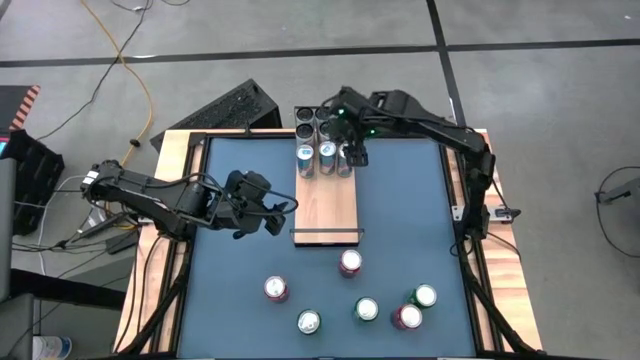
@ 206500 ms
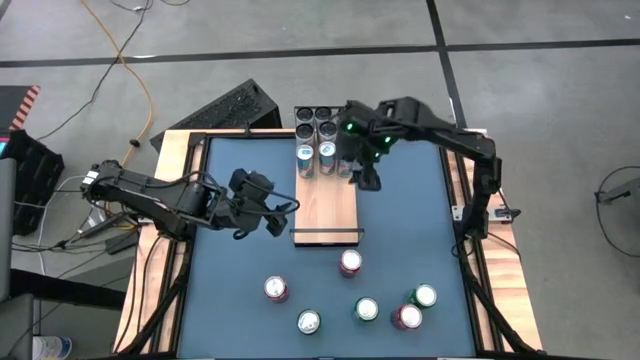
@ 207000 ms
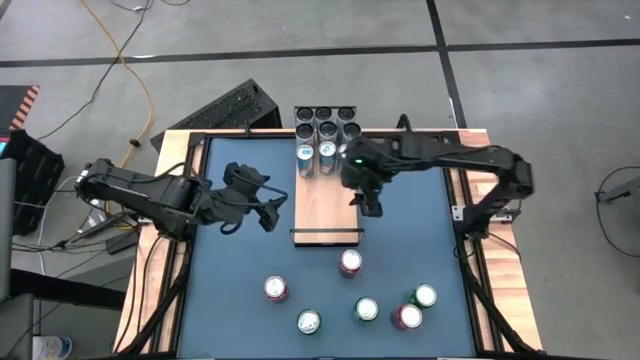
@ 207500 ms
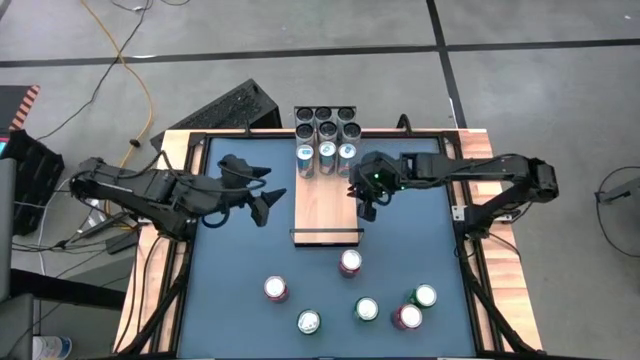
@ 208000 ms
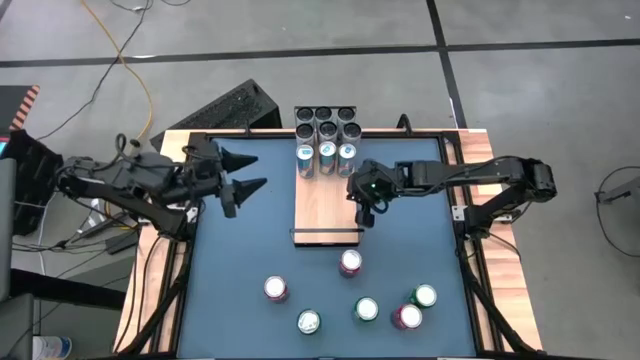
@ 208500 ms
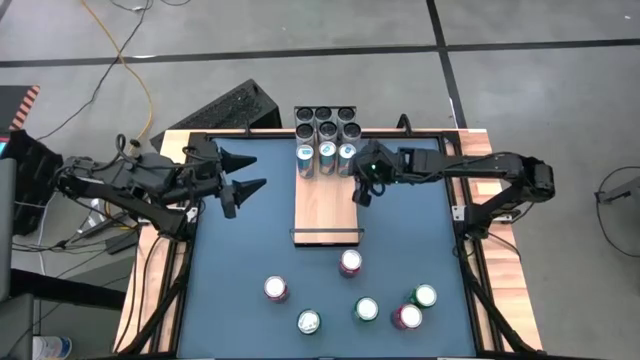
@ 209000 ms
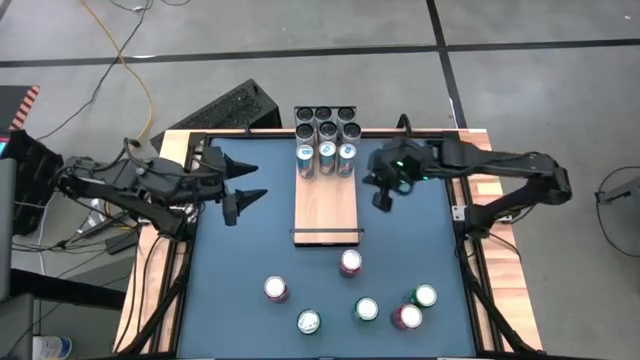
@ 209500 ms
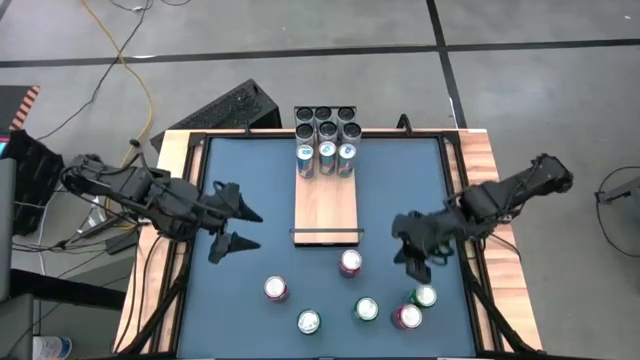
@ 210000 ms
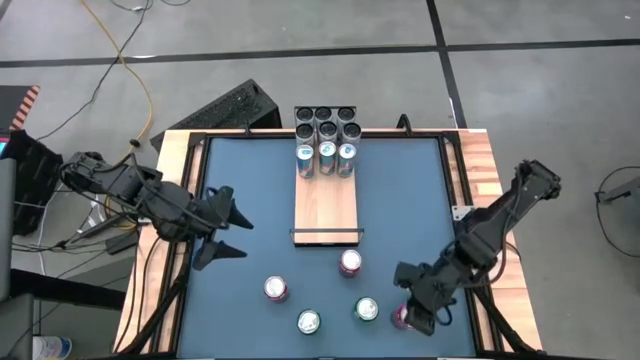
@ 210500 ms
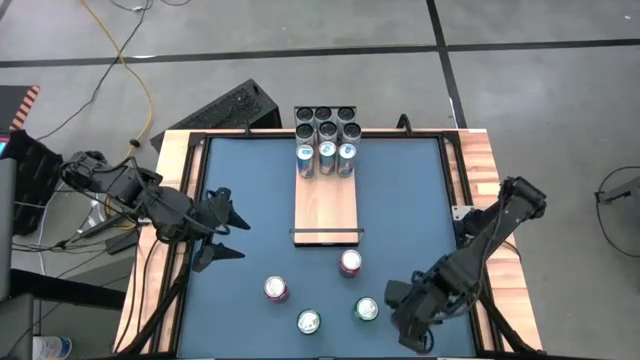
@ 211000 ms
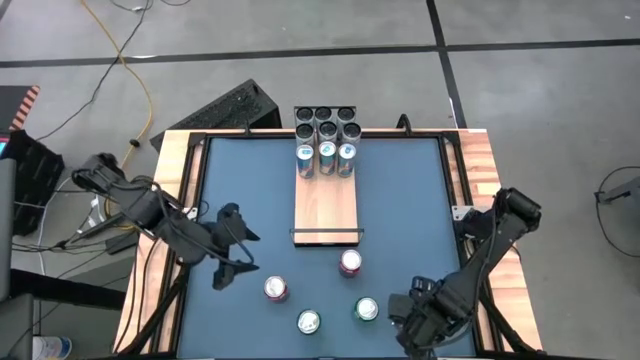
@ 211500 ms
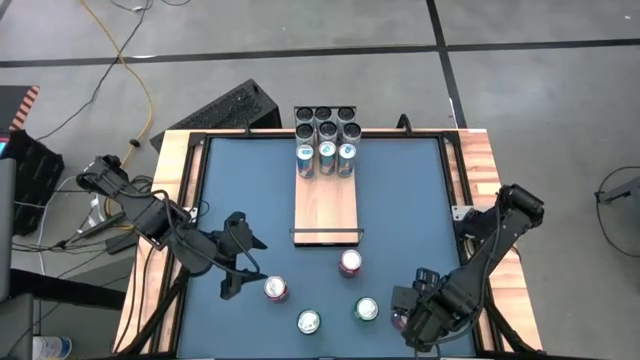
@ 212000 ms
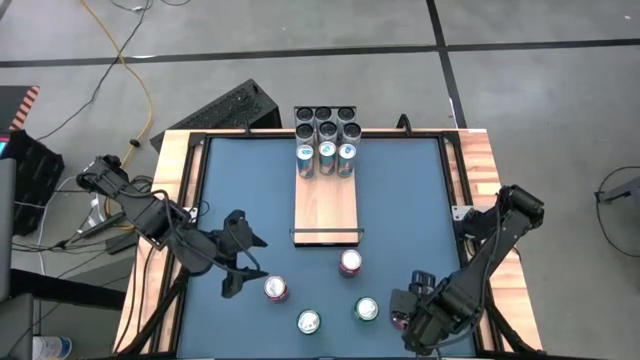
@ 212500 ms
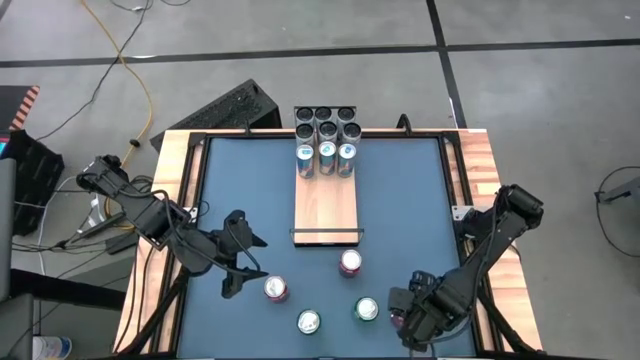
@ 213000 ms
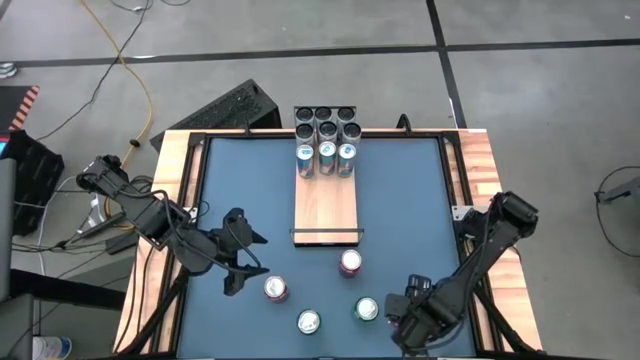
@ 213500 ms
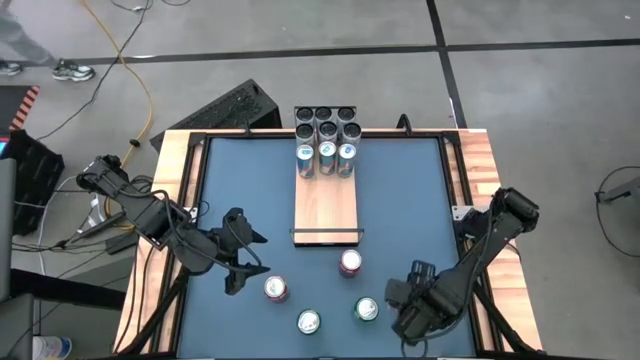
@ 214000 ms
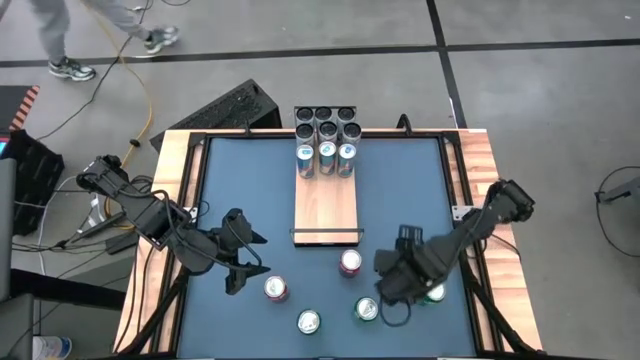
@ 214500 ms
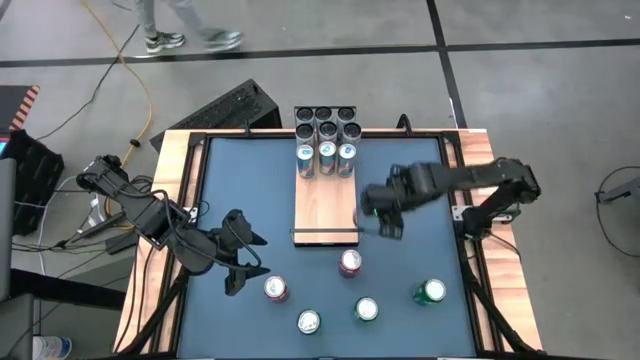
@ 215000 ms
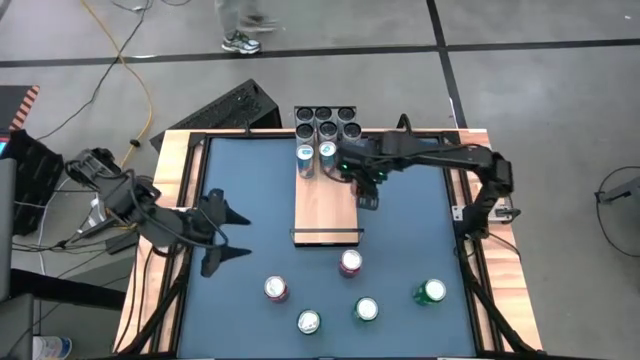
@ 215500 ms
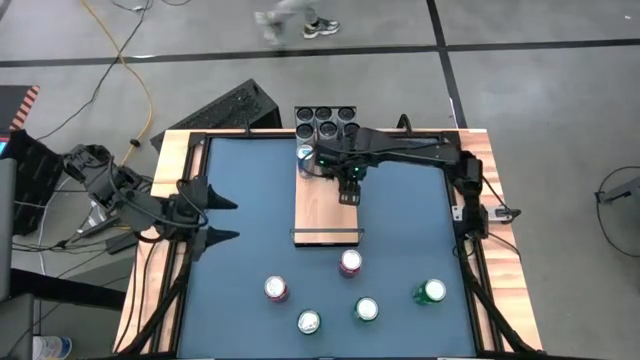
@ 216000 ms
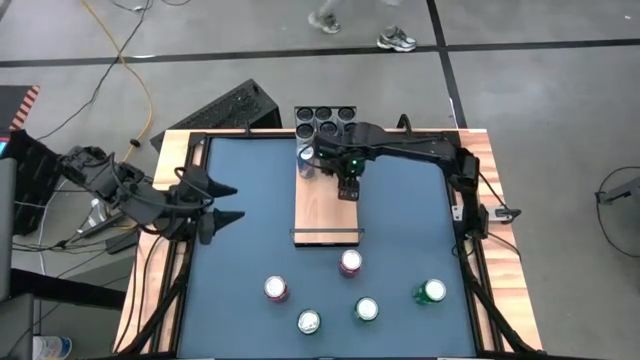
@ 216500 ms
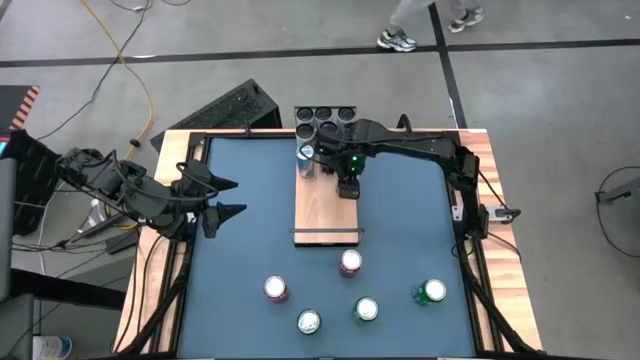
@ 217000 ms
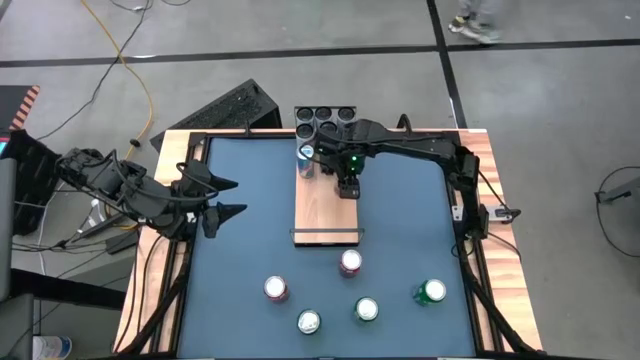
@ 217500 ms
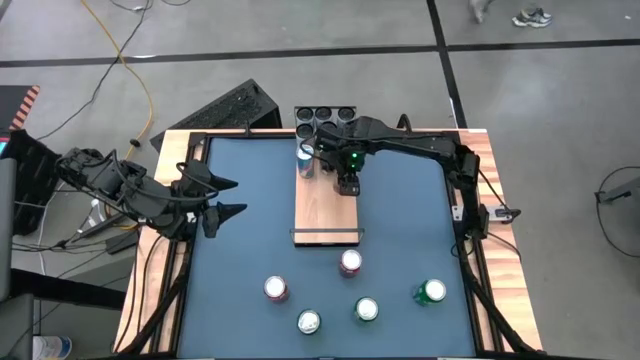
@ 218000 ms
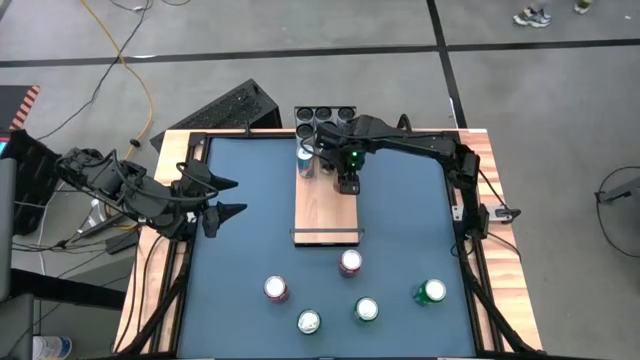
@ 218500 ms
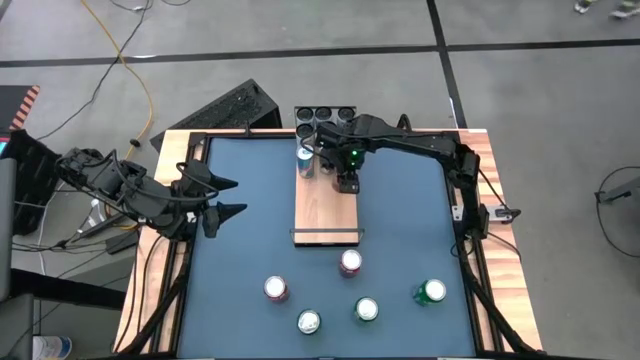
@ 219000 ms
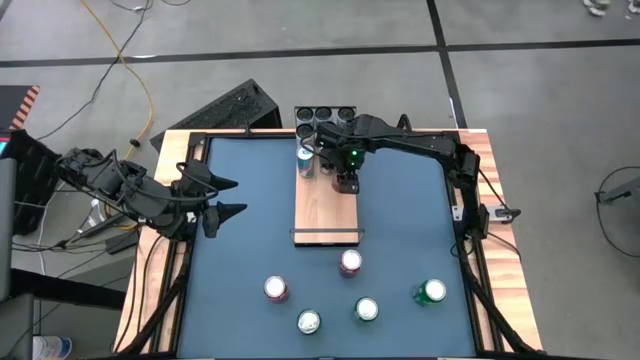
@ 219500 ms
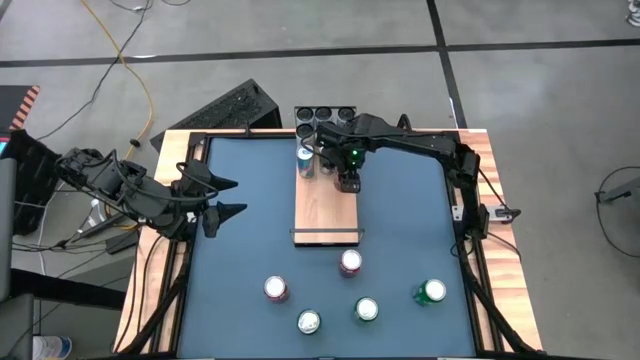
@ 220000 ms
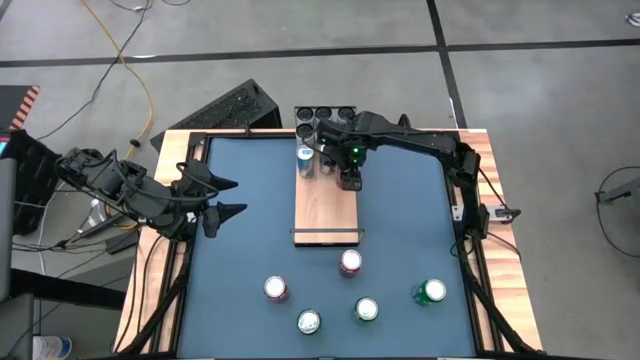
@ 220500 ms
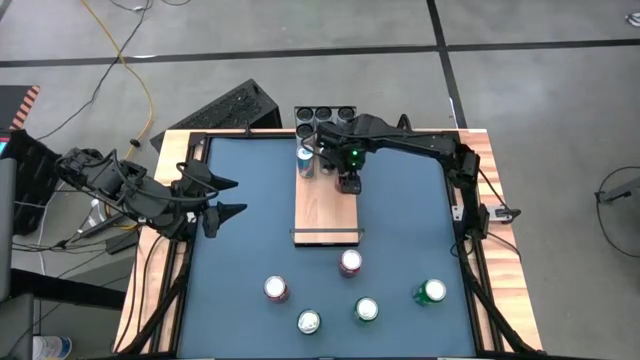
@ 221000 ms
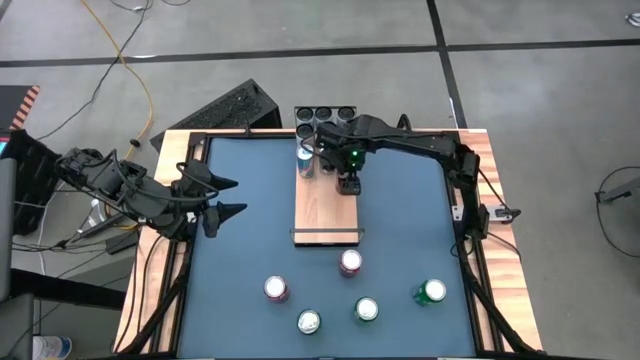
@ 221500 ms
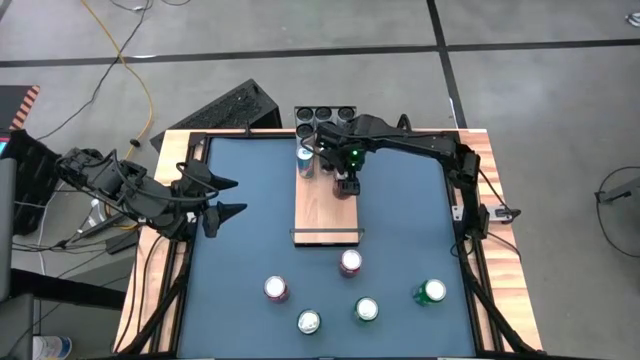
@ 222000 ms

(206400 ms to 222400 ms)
Task: Place canned beverage on shelf
Put the bottom right red soda can on the shelf

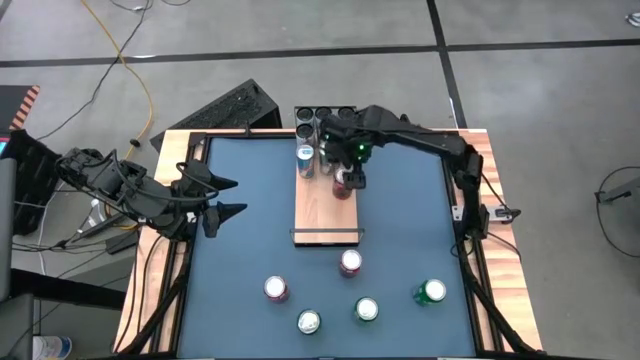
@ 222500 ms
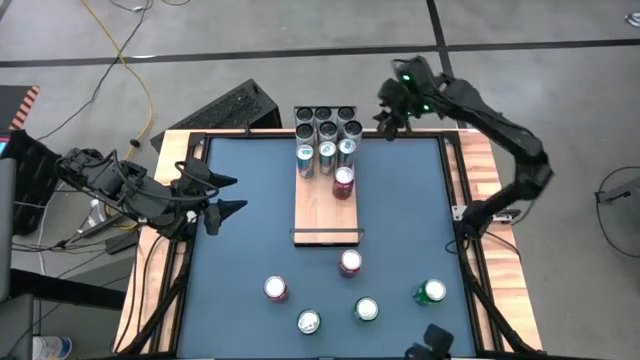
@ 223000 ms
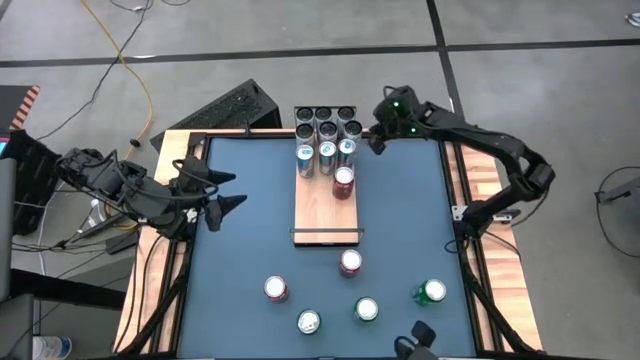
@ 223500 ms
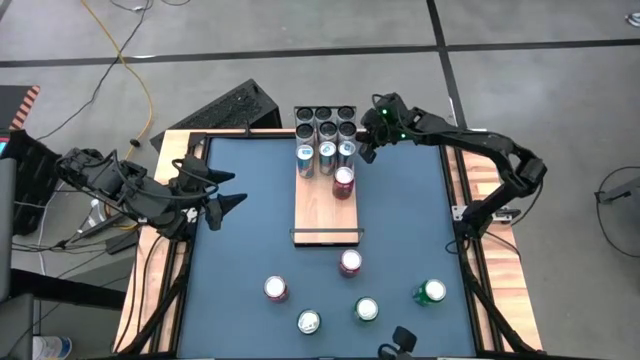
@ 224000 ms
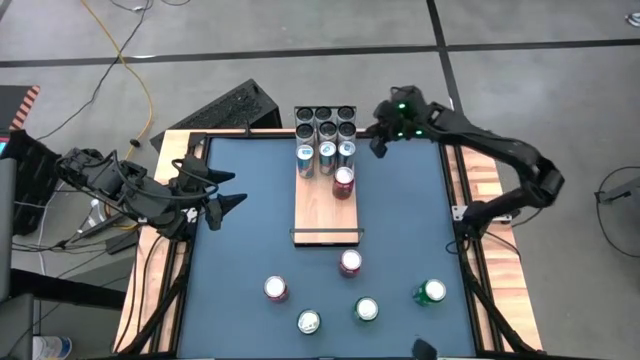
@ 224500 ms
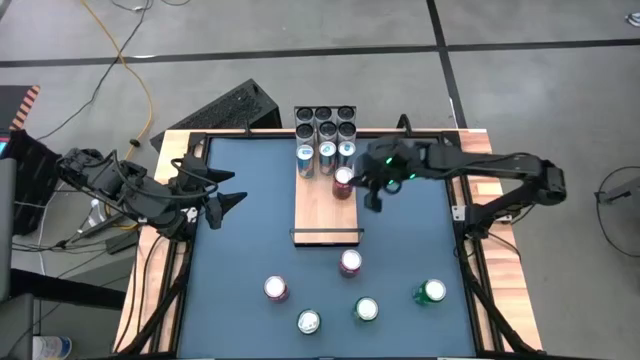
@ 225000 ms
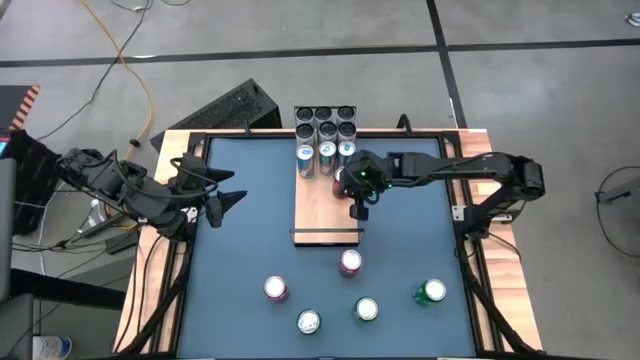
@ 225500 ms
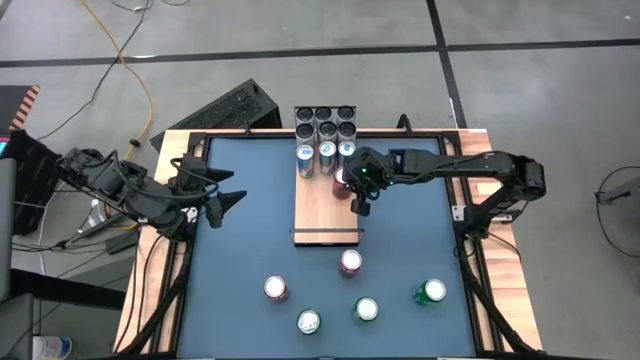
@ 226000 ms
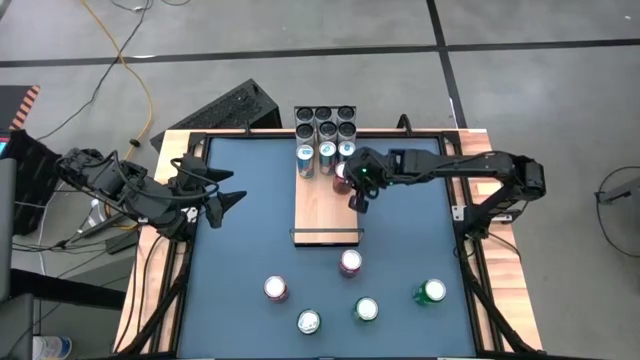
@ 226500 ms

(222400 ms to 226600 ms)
Adjust the soda cans on the shelf
